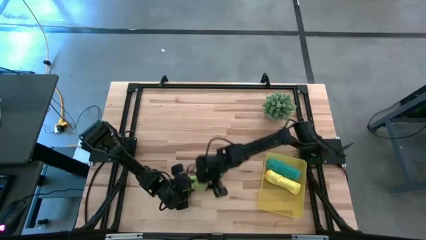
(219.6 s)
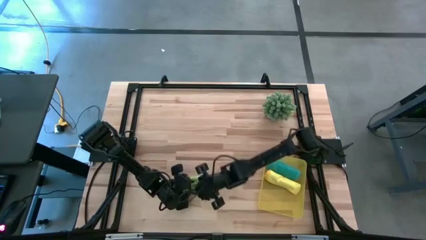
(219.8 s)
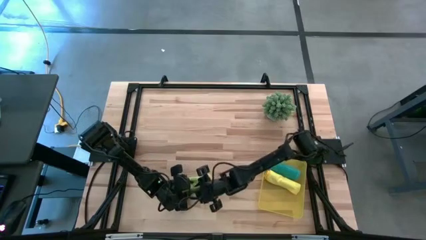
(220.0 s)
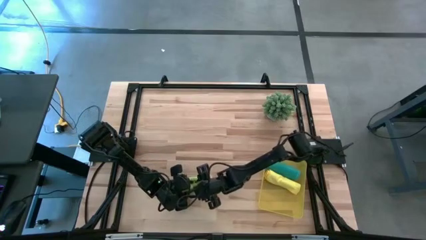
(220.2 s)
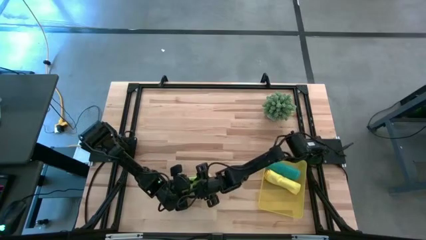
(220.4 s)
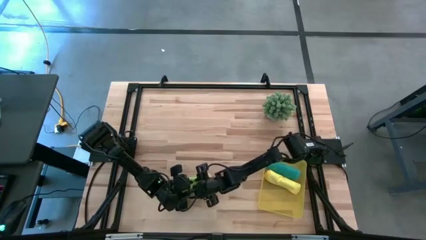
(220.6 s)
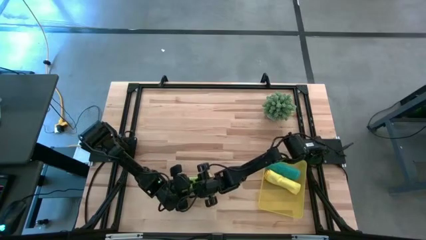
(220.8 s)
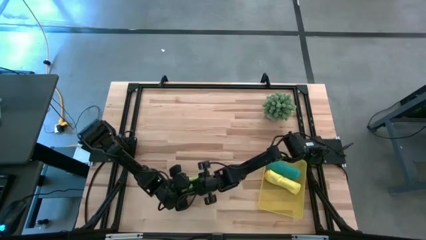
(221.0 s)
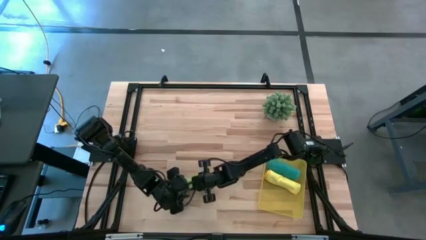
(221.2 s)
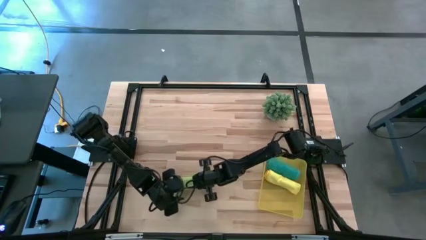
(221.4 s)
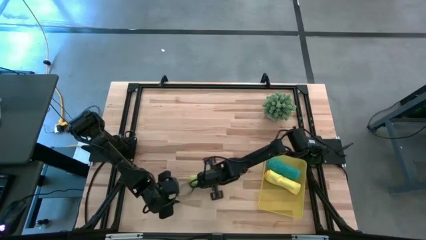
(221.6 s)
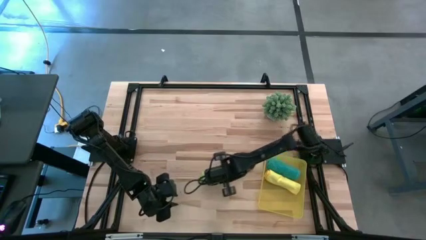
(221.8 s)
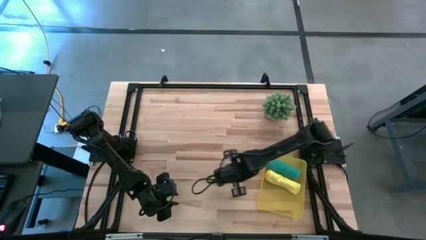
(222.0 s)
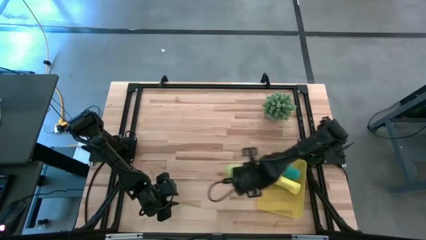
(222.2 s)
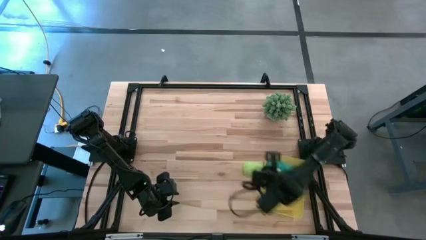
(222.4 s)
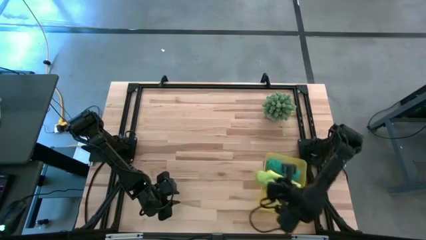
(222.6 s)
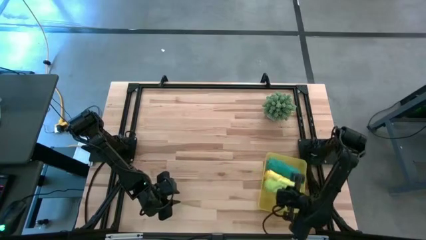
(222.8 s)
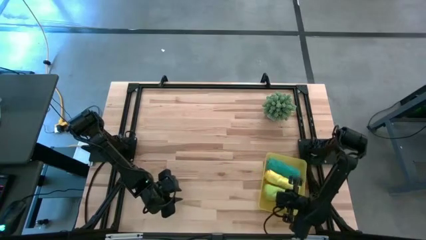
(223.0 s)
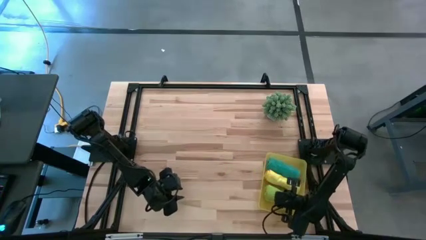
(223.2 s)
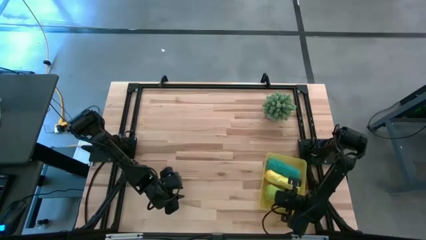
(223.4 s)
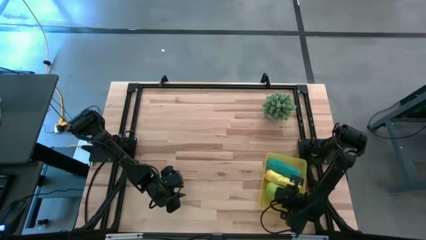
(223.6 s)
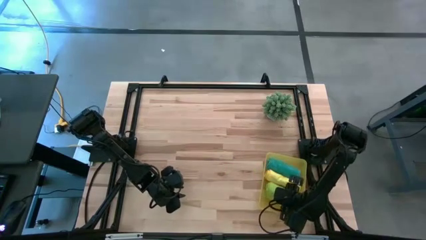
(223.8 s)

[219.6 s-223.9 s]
Task: Roll microfiber towels into tight, uniform cylinder then place into a basket
Put the green microfiber cloth into the yellow bin

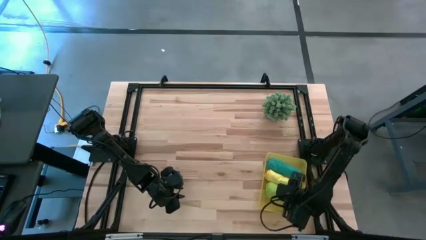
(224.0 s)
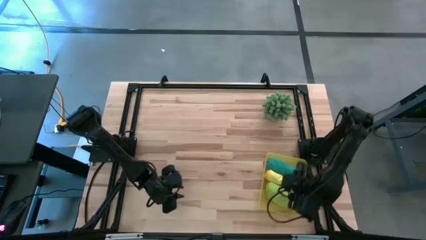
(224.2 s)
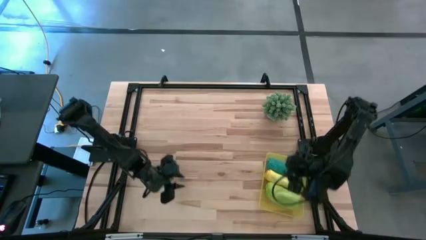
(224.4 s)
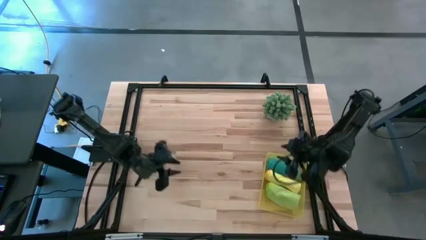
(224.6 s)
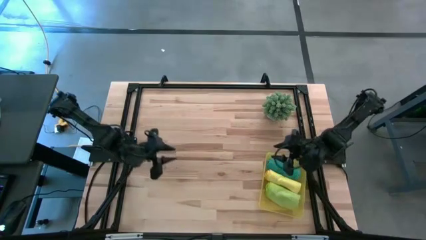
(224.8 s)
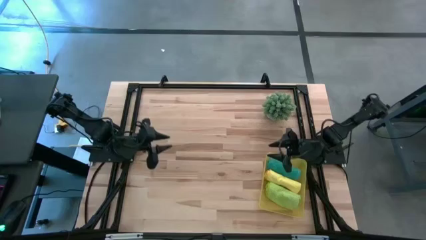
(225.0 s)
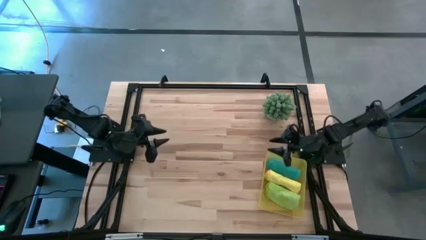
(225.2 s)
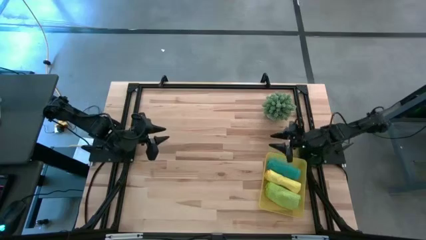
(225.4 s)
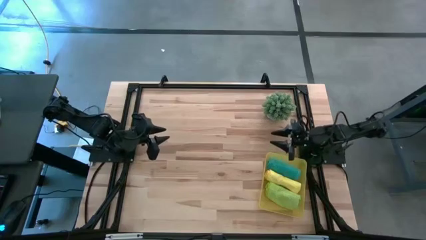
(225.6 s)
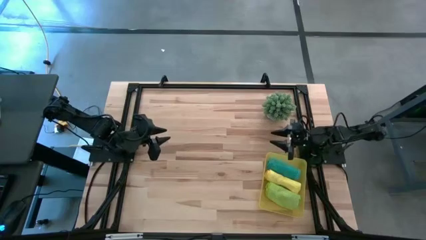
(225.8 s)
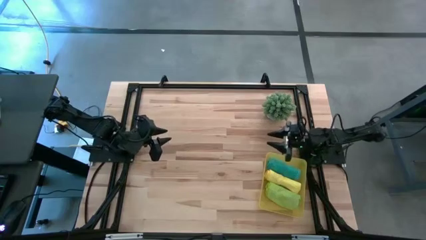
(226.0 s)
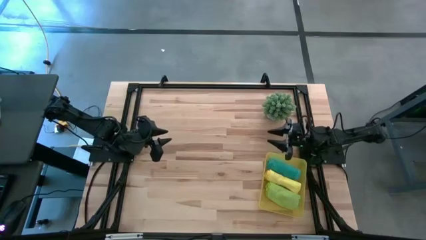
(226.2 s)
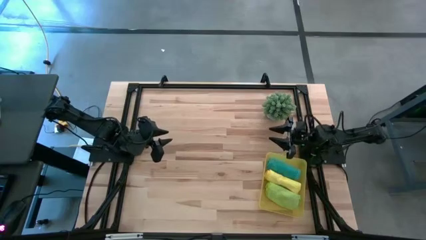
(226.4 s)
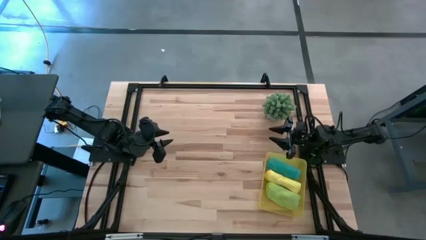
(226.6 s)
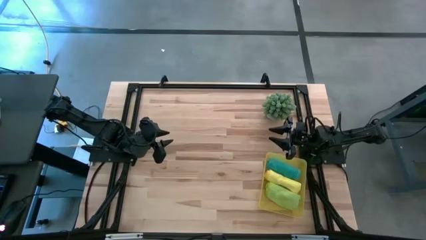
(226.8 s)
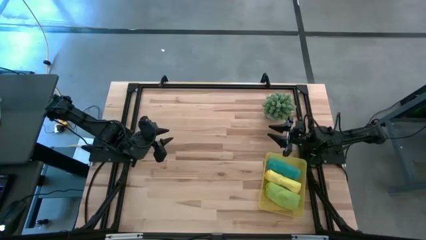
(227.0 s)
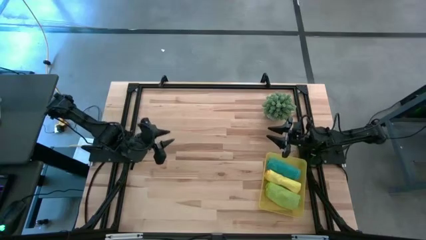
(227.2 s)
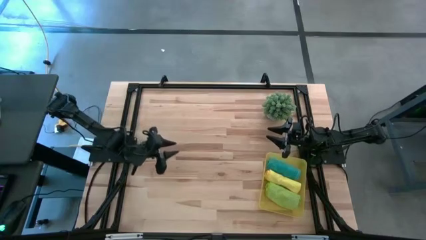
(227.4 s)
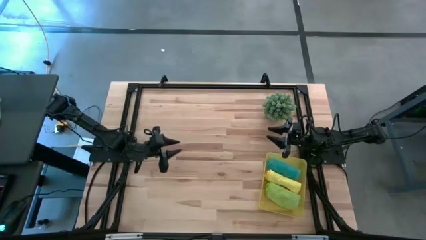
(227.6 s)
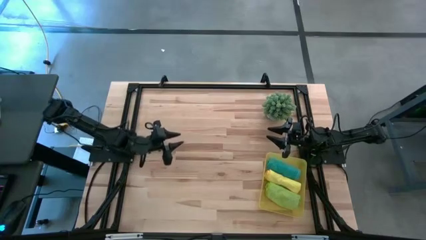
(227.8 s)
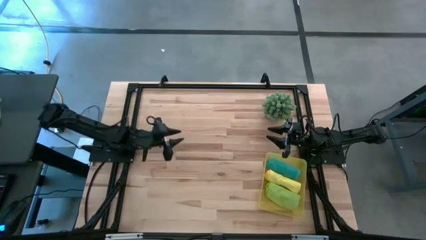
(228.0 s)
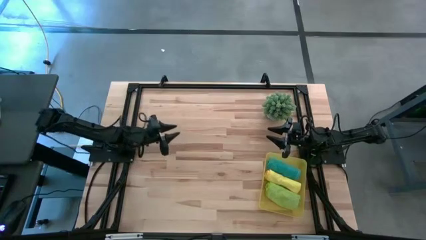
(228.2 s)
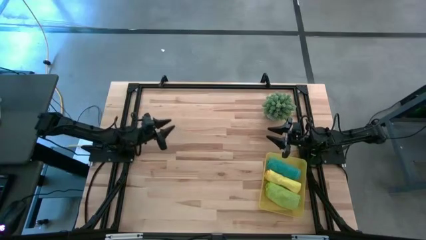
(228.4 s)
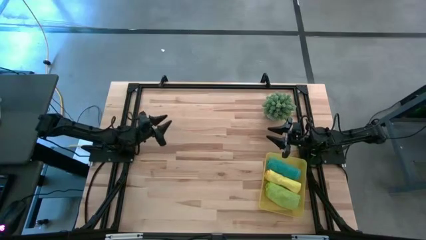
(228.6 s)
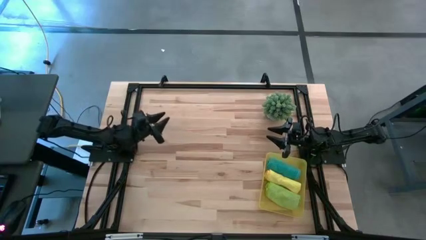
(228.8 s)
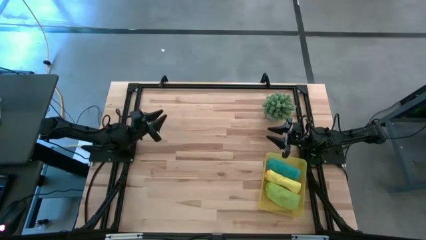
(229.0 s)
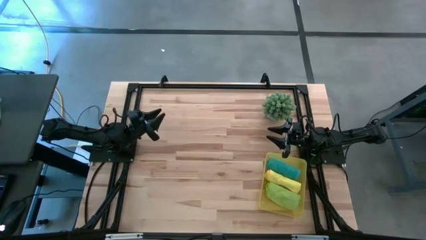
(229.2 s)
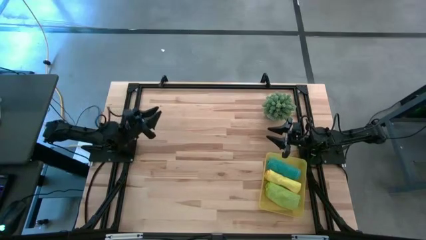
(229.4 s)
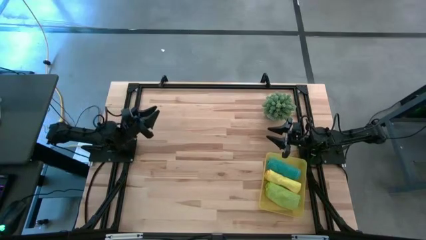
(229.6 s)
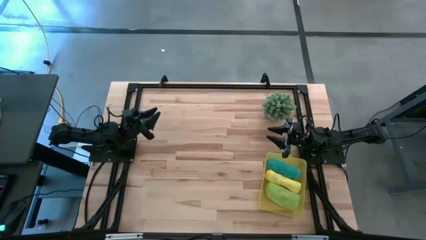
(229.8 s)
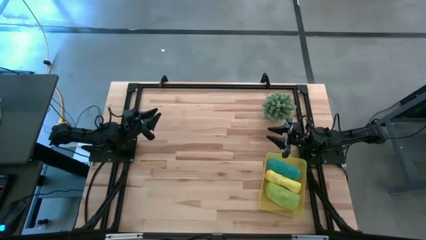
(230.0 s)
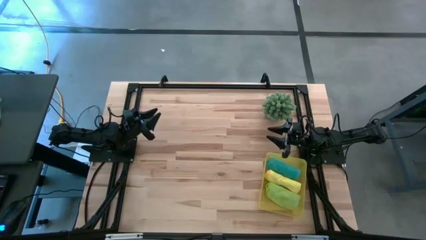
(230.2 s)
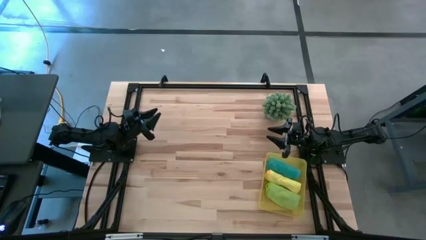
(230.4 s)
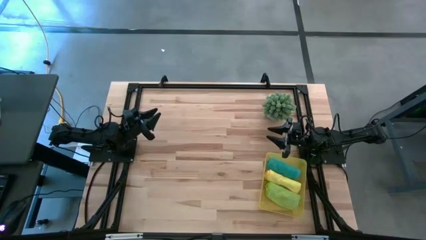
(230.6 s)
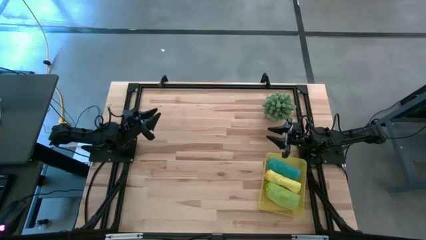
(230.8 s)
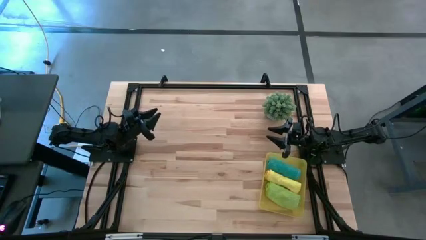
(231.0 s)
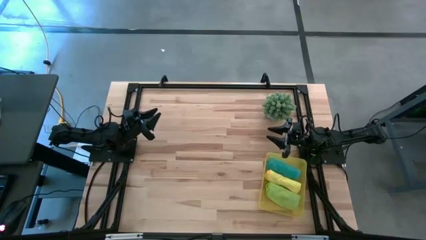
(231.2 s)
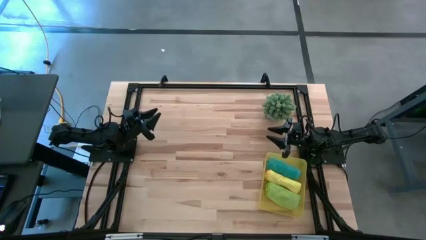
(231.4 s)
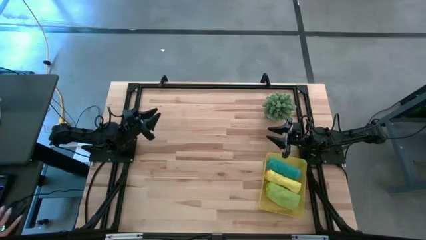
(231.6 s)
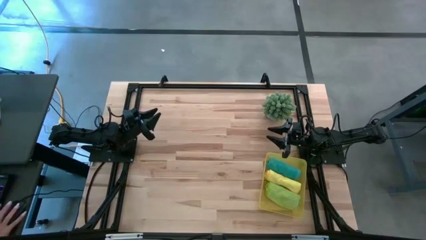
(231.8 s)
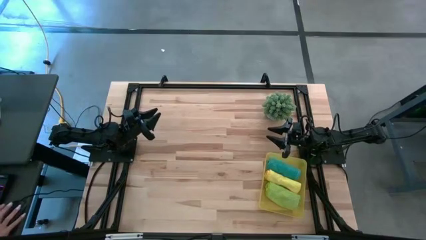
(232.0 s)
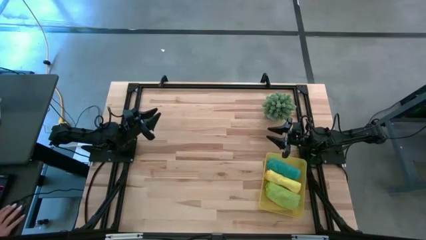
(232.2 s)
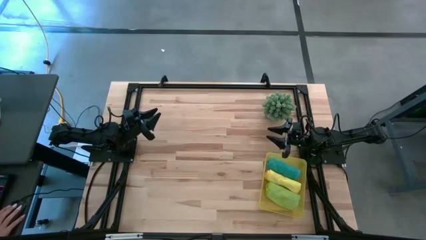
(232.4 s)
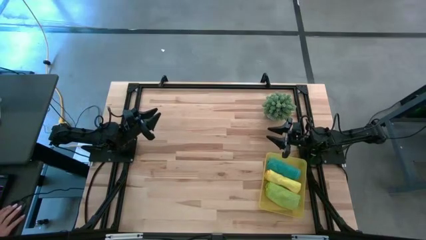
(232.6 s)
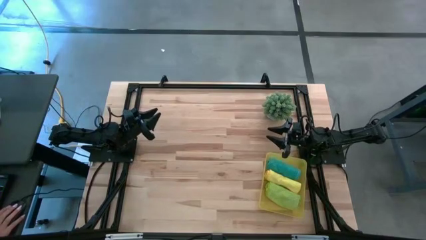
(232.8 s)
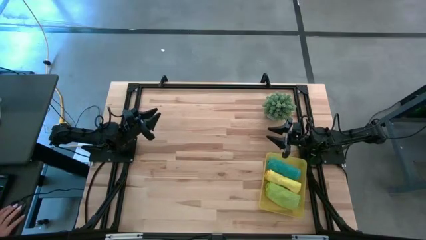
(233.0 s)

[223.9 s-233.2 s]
Return to Home Position
